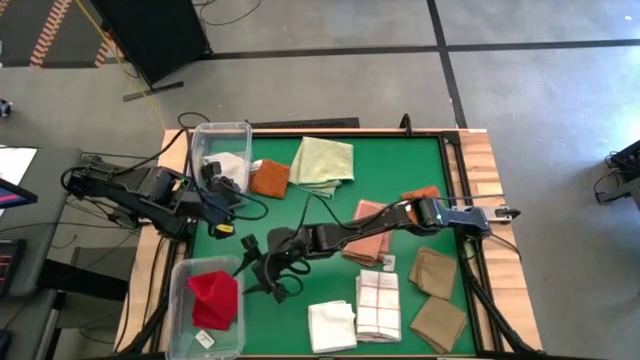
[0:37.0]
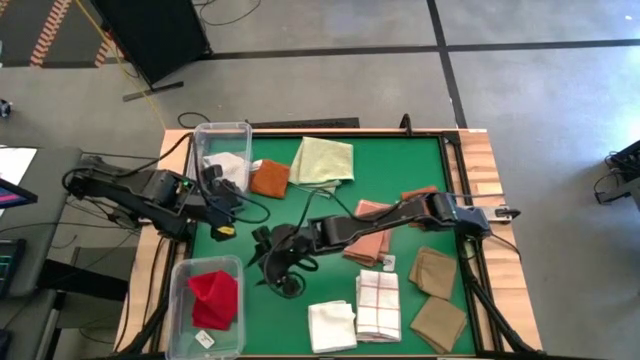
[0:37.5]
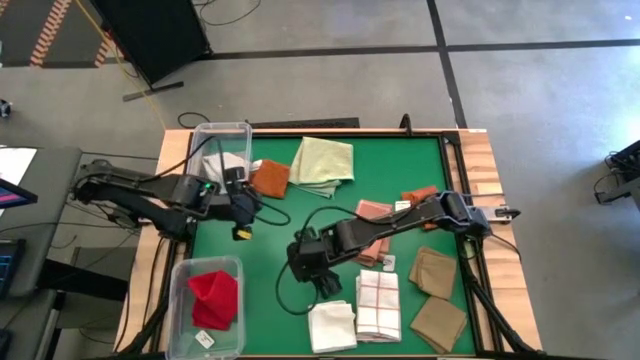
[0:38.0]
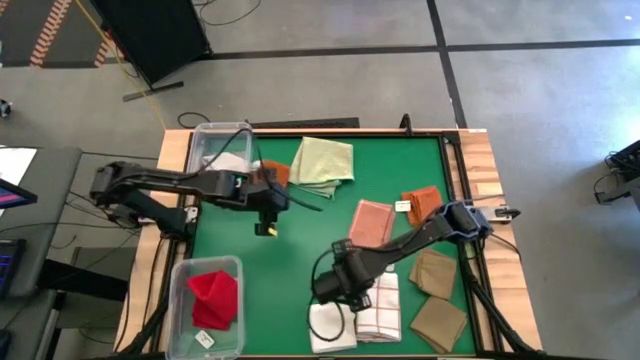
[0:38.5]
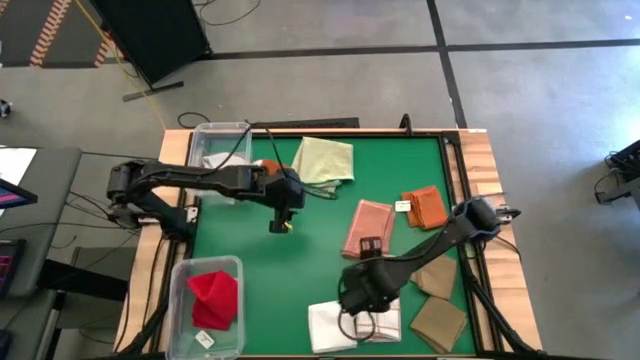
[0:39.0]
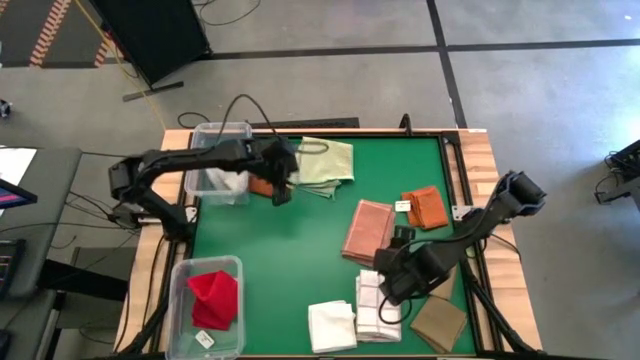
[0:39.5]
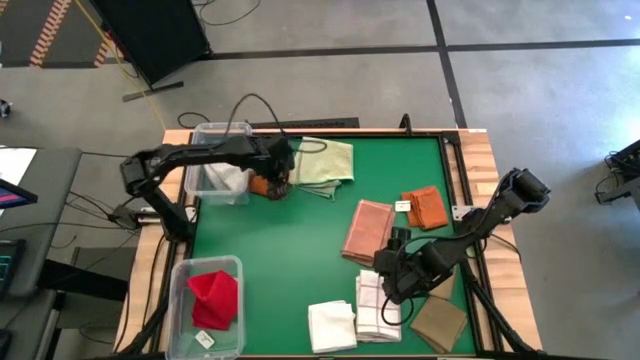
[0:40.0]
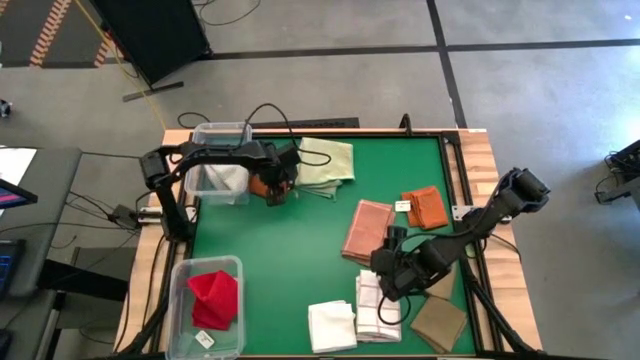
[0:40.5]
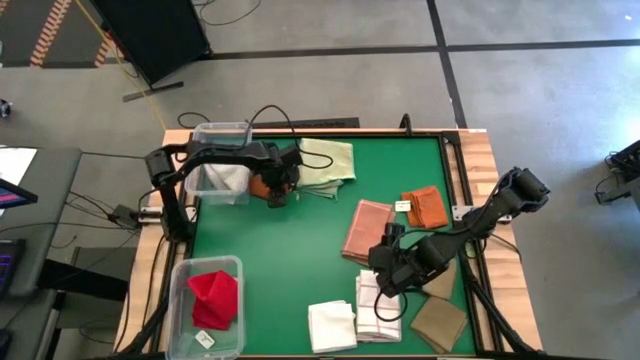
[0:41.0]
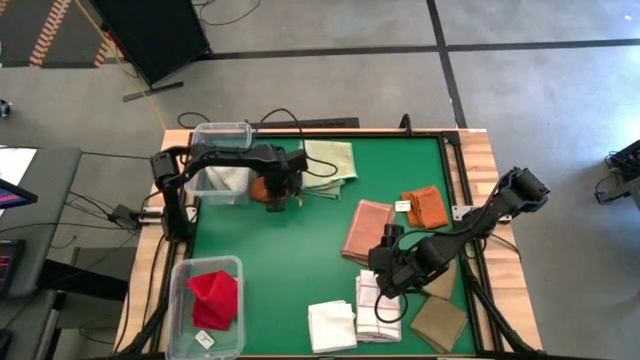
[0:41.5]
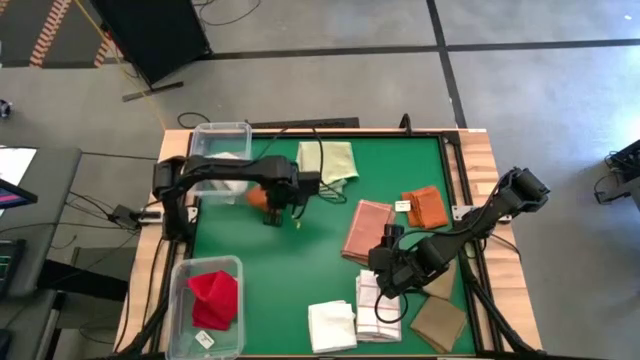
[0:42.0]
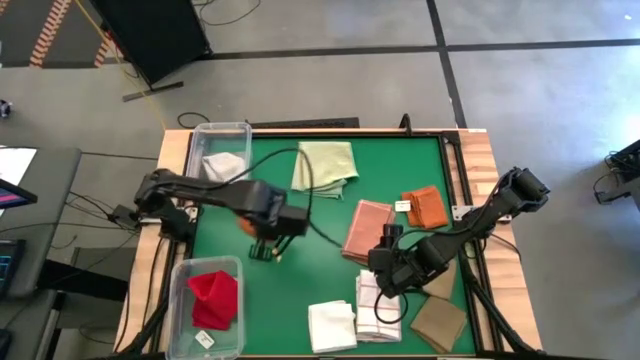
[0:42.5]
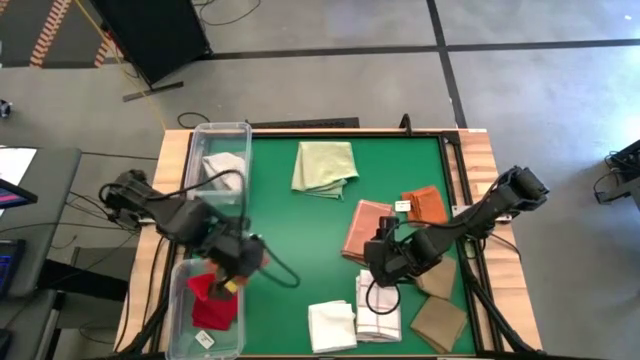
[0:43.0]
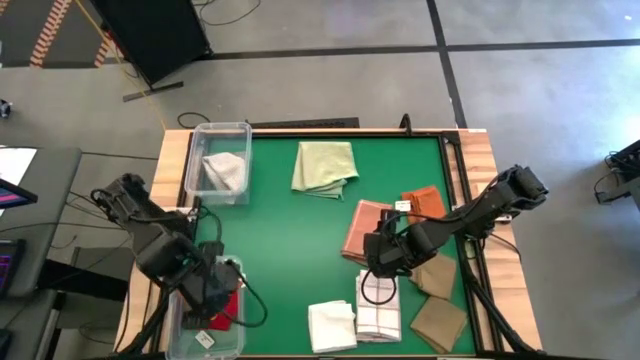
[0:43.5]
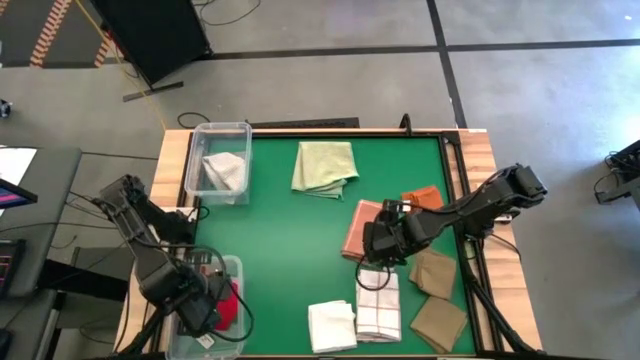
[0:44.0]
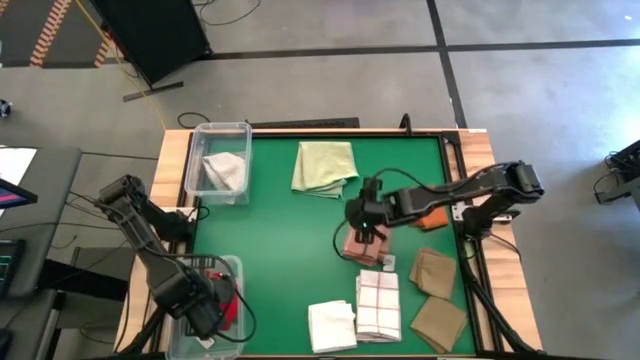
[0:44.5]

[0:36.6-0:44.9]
Task: Sort towels by color in basket
Put the top orange towel into the bottom transparent bin

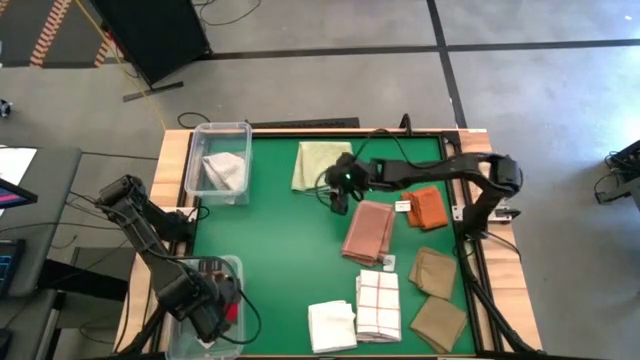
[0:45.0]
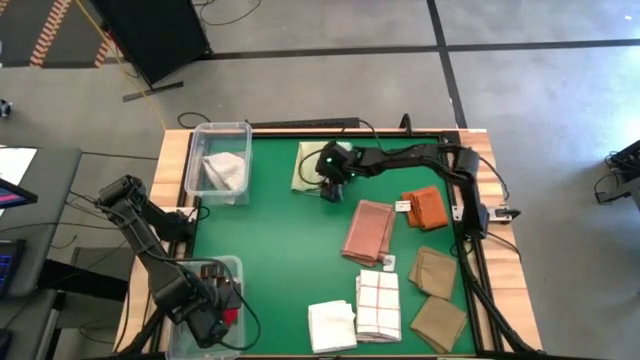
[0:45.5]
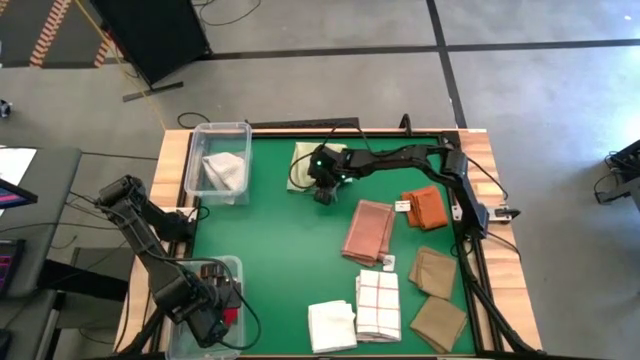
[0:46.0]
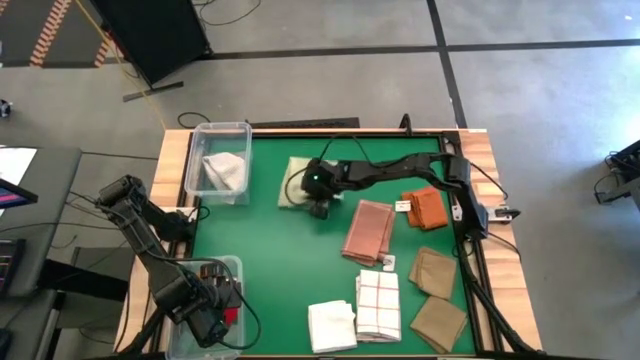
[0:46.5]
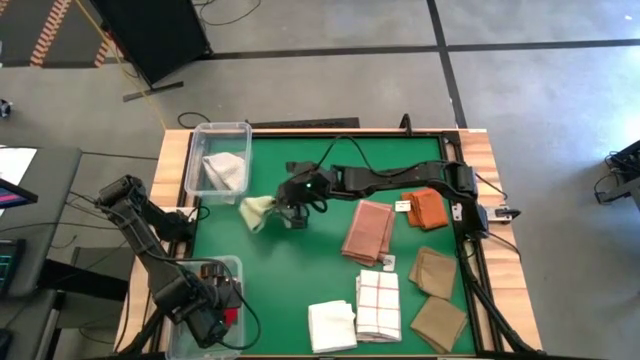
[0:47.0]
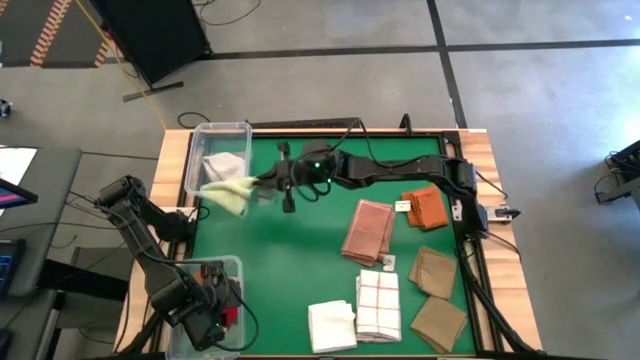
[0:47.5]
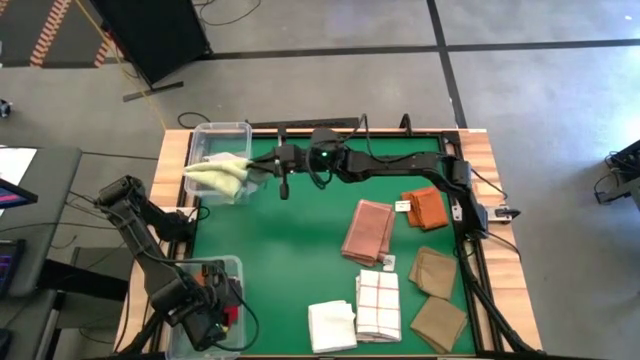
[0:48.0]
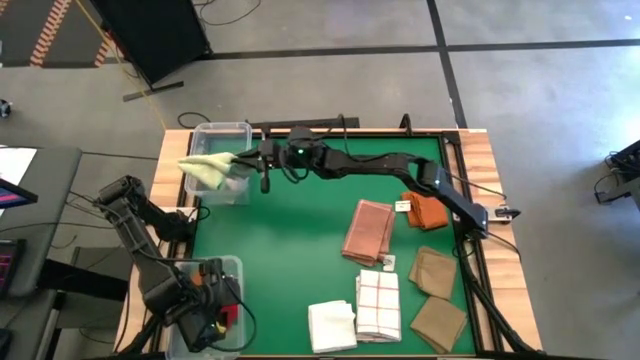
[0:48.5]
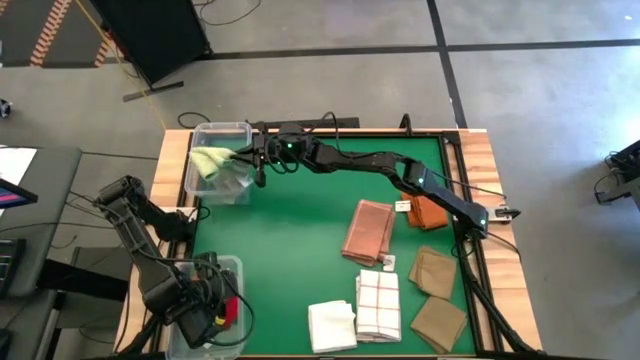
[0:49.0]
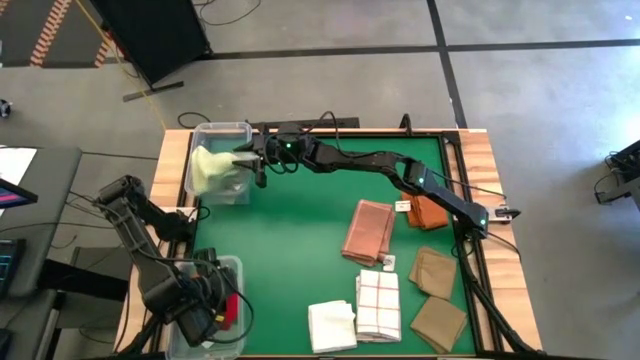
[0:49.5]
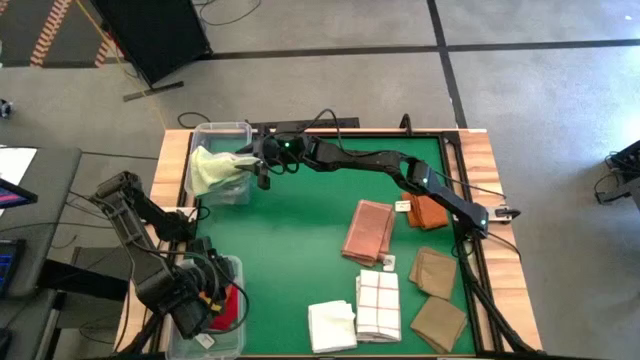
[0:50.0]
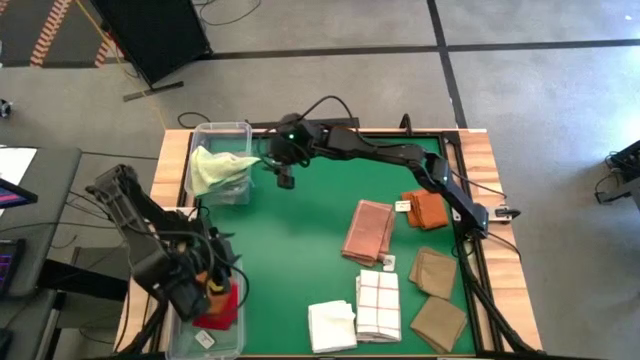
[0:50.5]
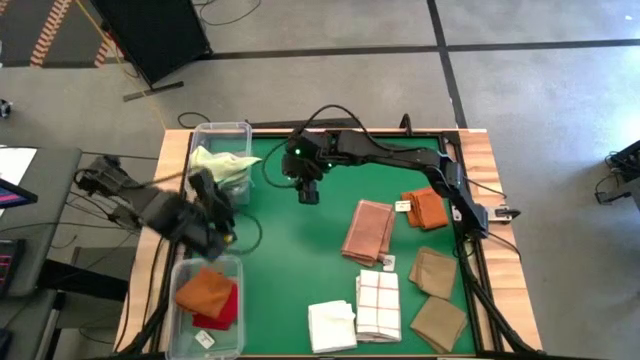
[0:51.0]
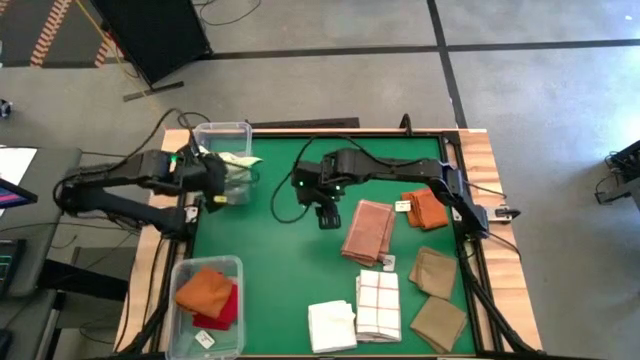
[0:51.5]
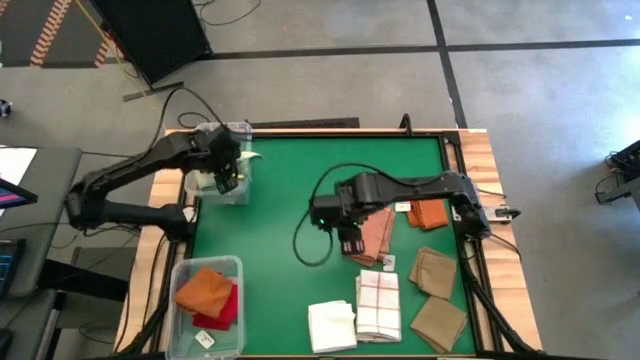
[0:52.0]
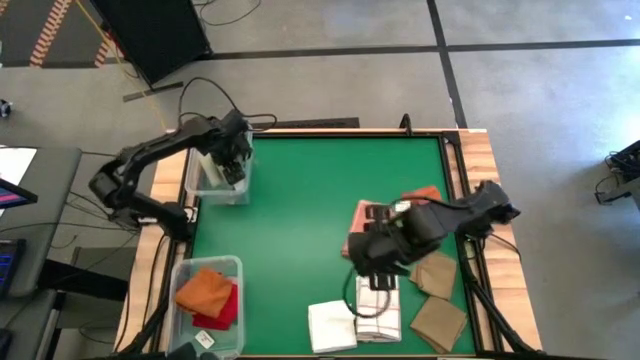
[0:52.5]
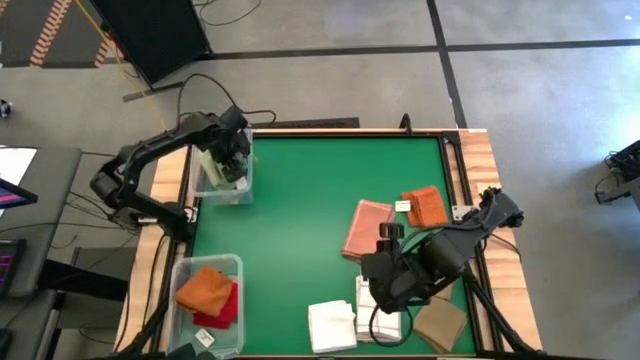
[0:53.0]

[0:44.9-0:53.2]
Put the green towel into the top transparent bin

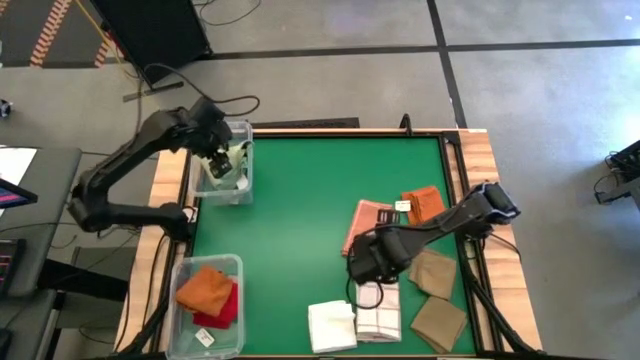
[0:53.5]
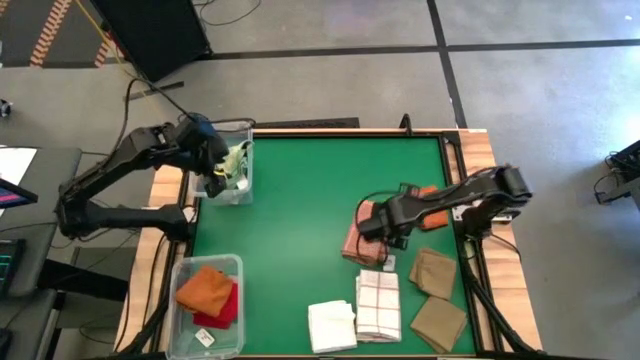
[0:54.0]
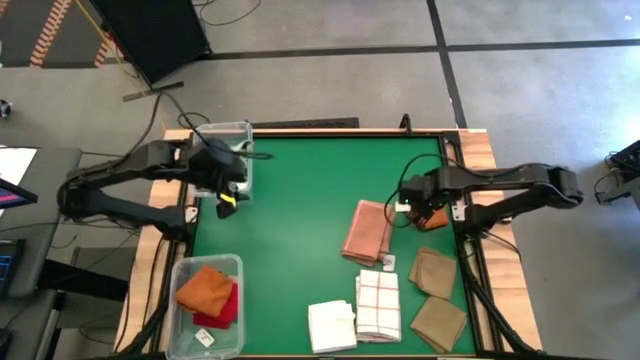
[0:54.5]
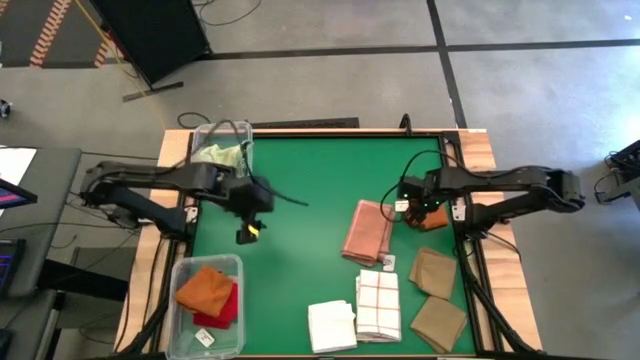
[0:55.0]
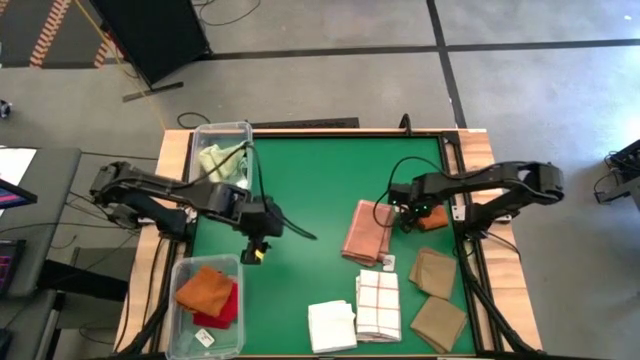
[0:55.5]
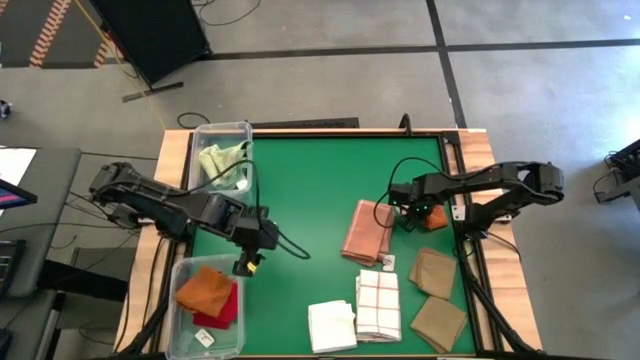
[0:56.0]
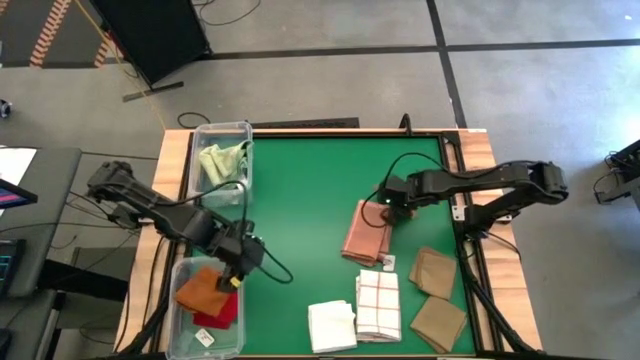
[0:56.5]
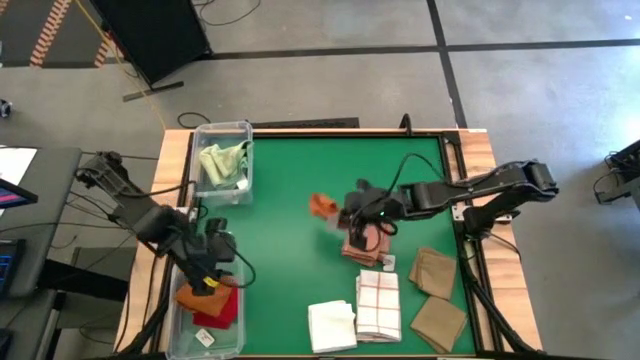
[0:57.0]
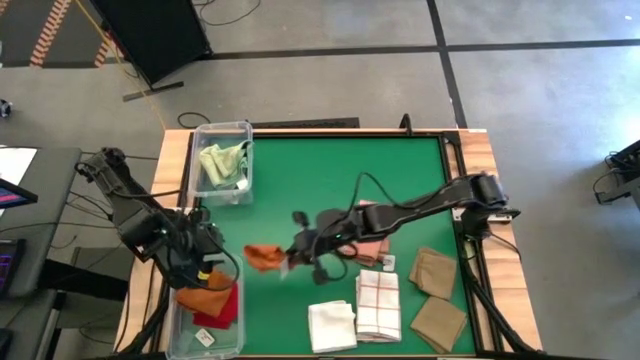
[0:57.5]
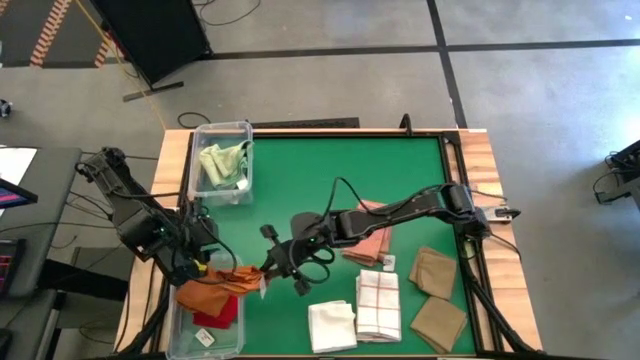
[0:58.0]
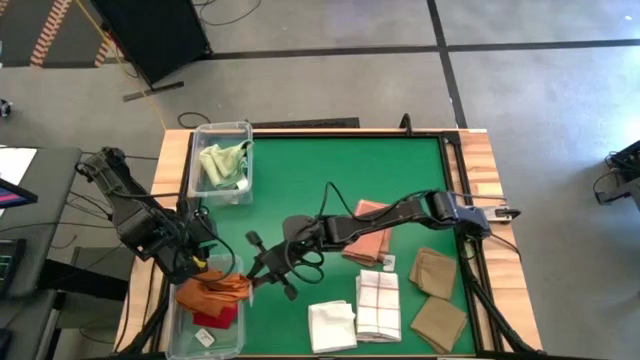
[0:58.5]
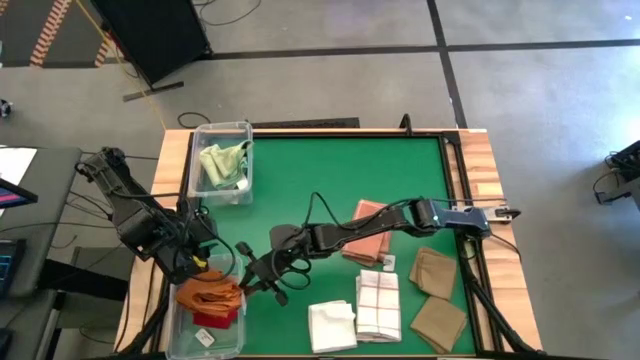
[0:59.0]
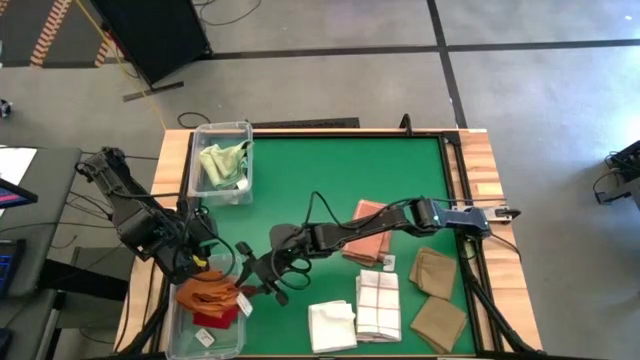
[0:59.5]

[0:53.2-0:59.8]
Put the orange towel into the bottom transparent bin
